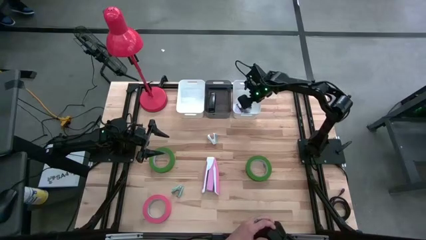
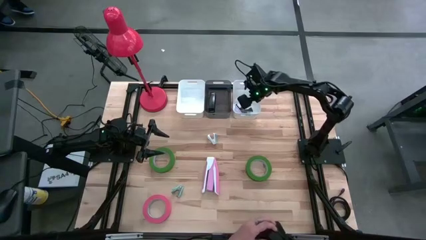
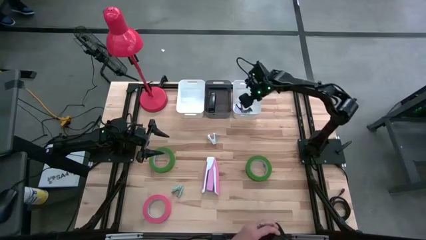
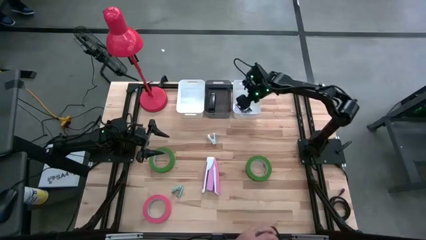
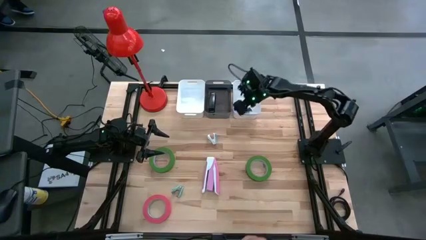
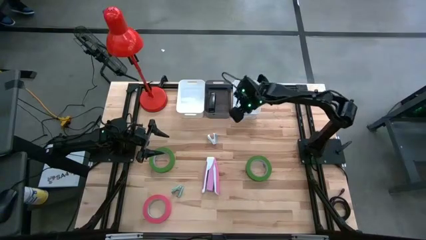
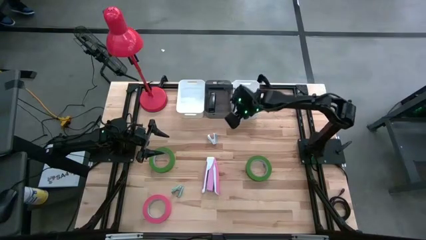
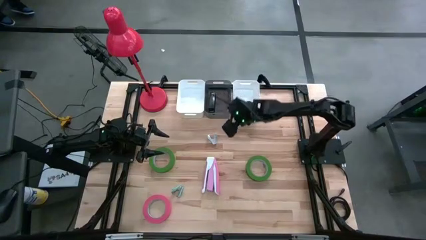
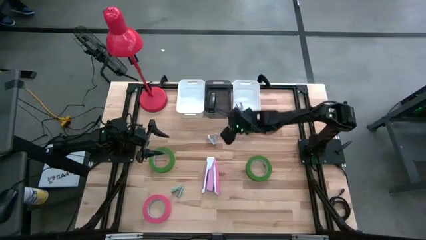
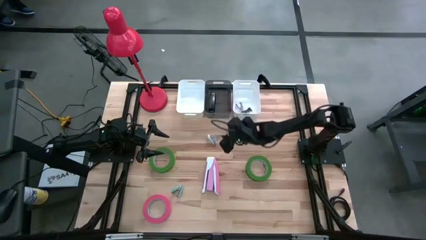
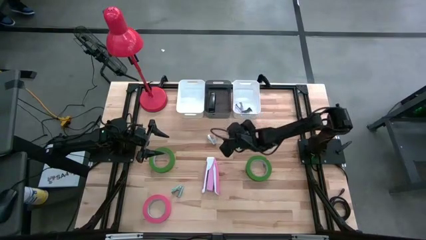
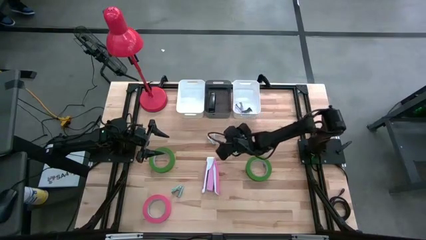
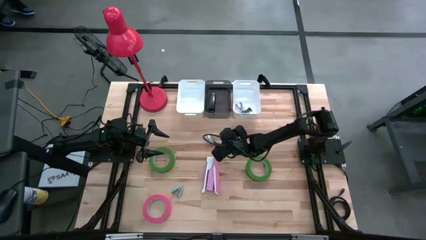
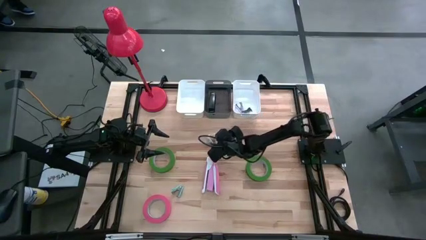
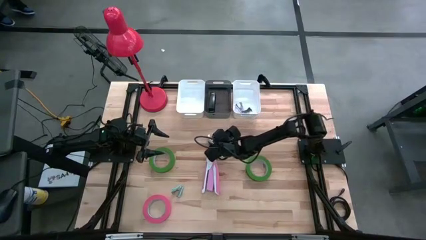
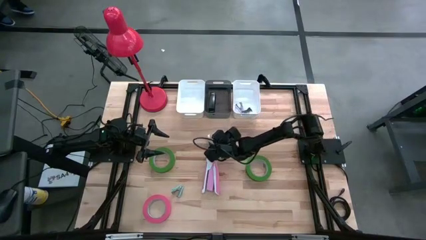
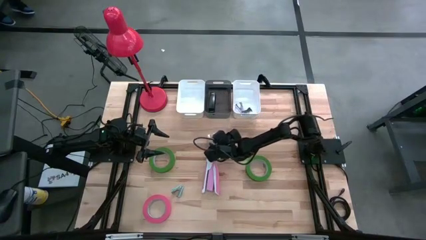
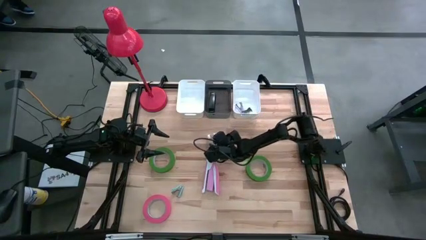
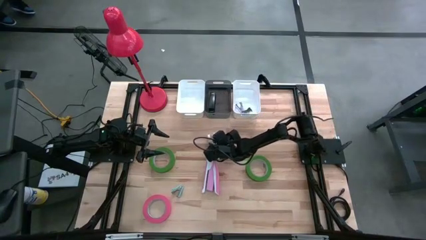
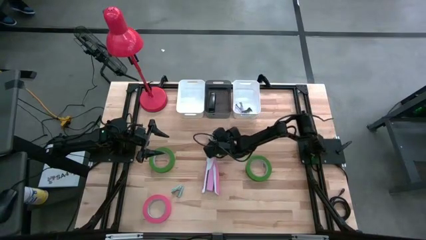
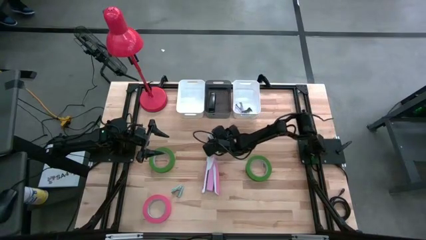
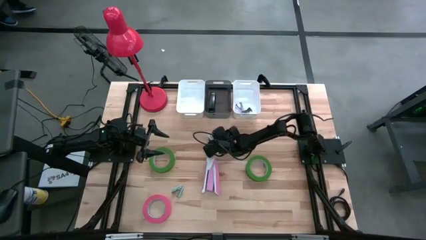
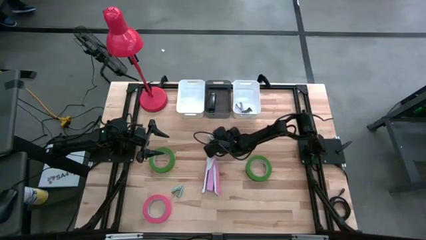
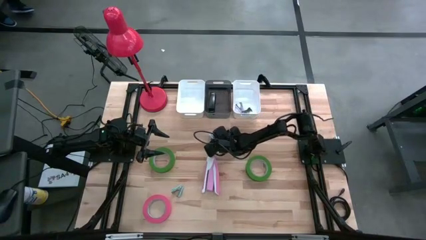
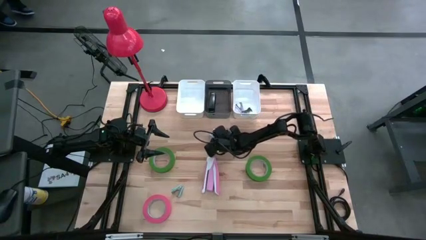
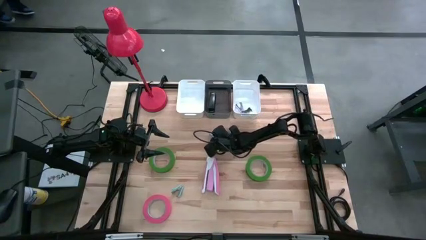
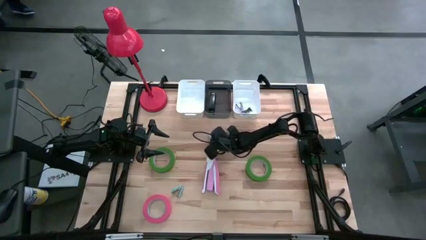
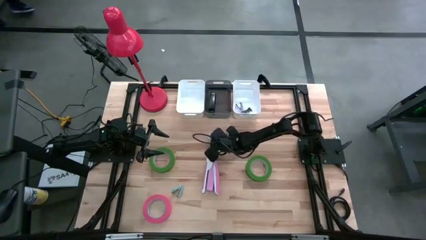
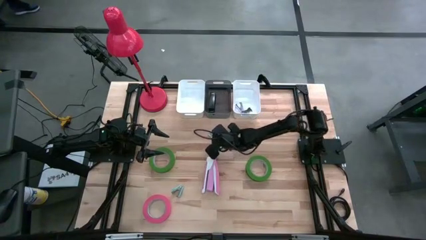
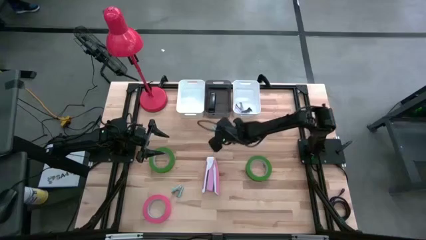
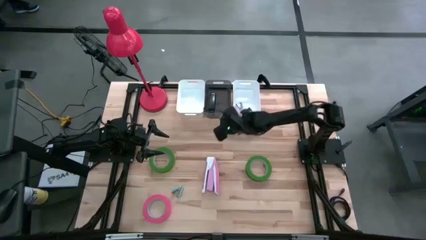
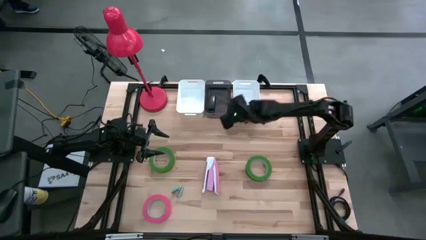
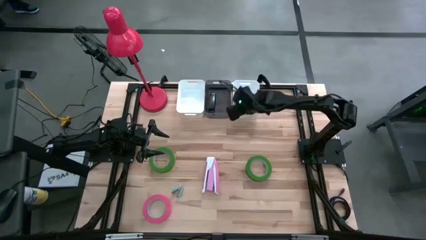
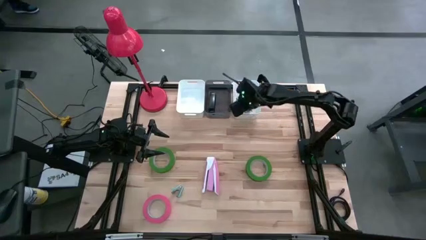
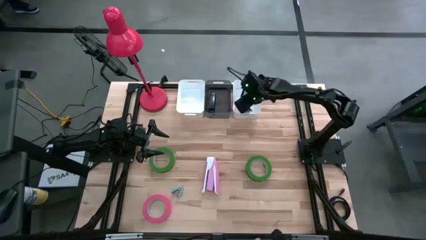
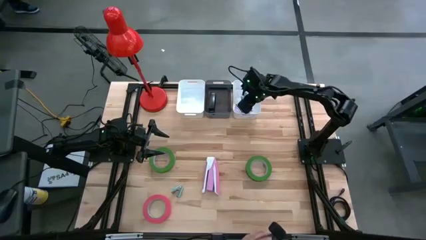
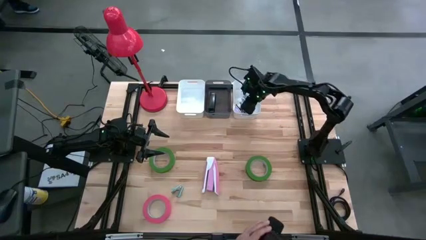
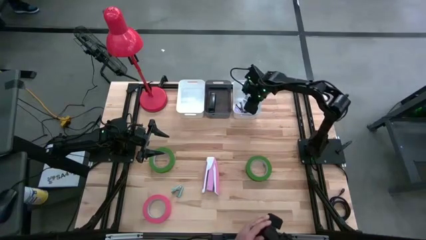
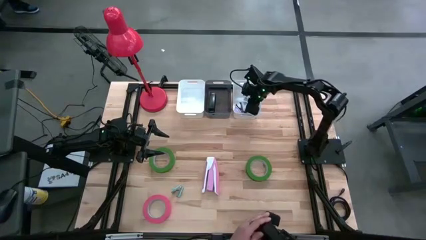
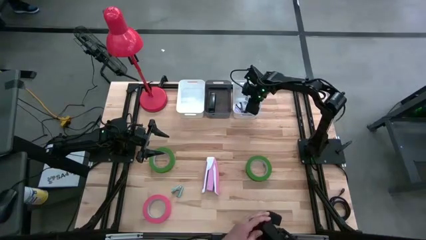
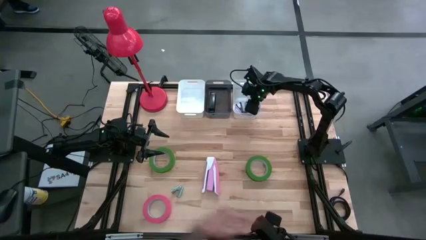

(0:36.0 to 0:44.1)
Task: Pick and place Stapler, Stapler remover, tape
Put the blue staple remover into the right white bin
